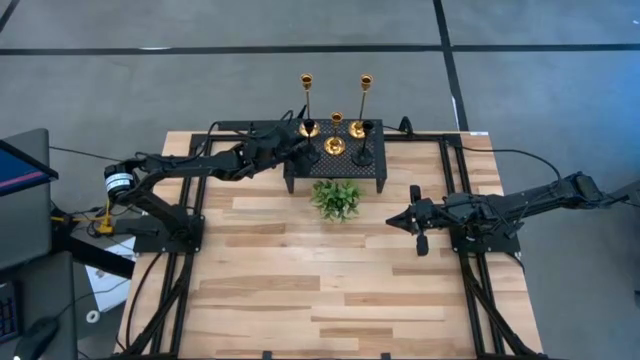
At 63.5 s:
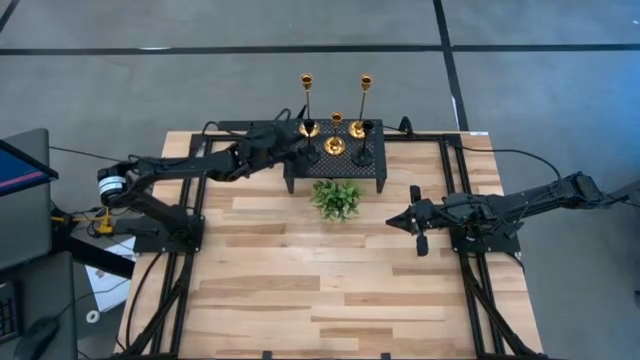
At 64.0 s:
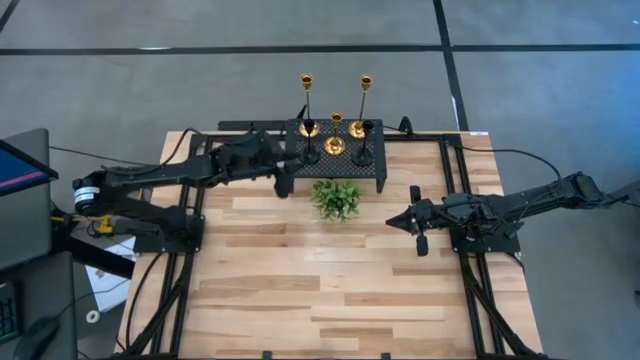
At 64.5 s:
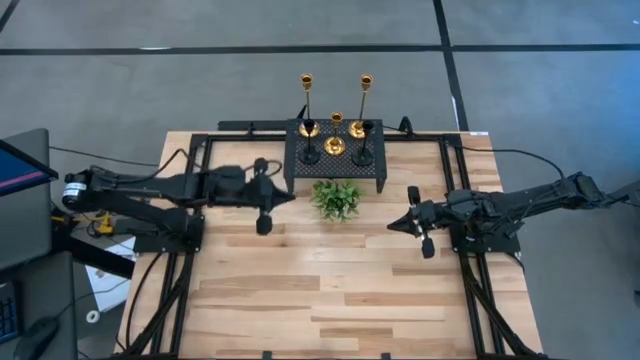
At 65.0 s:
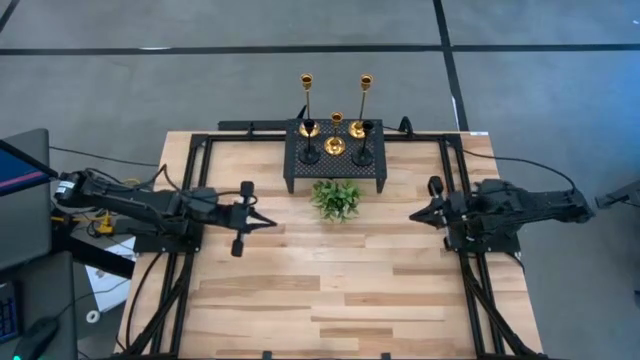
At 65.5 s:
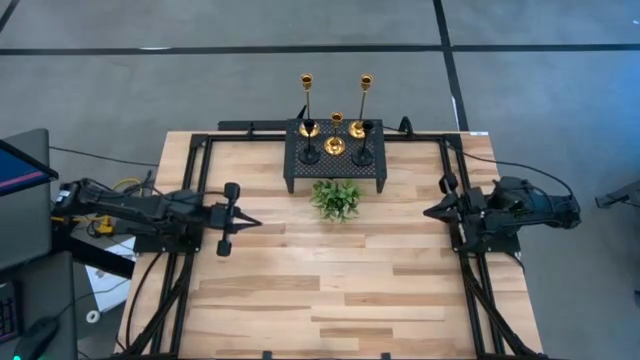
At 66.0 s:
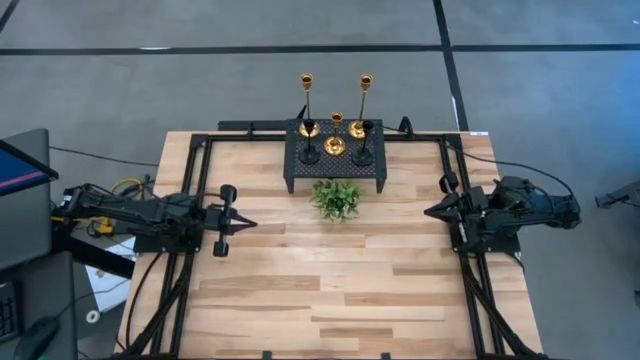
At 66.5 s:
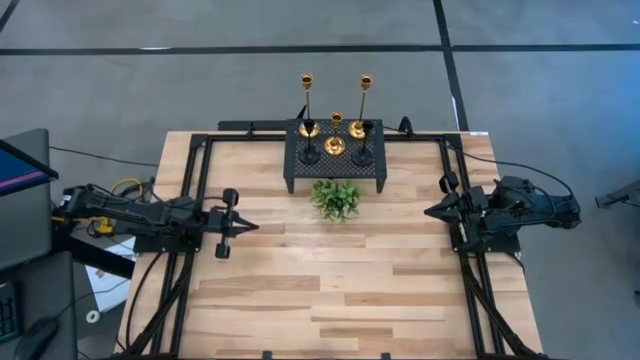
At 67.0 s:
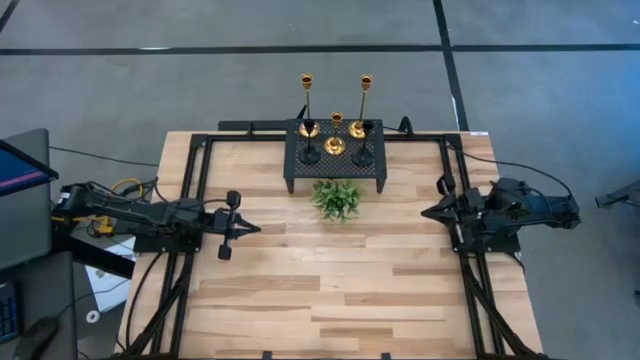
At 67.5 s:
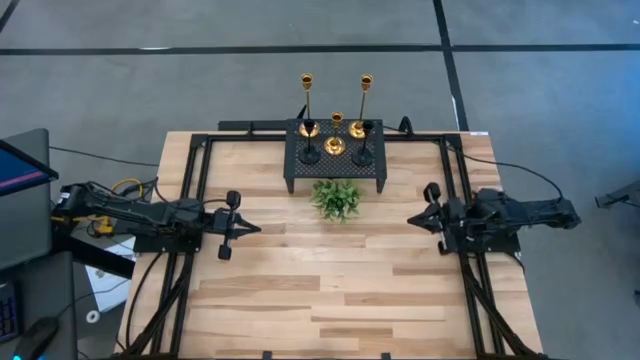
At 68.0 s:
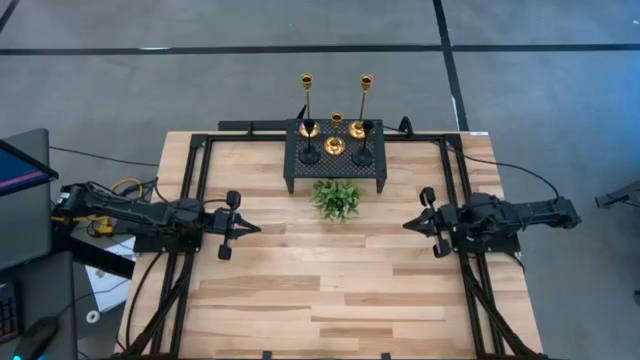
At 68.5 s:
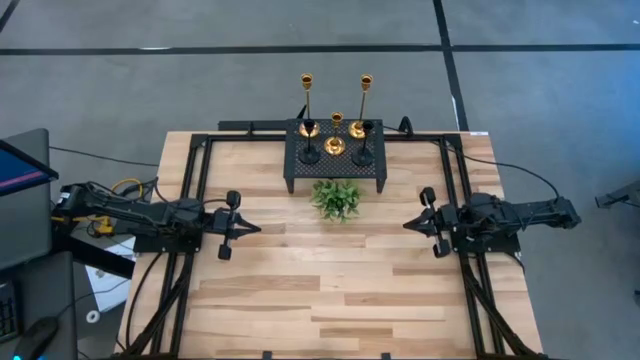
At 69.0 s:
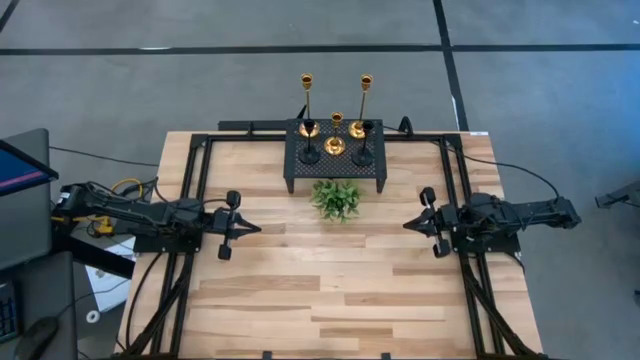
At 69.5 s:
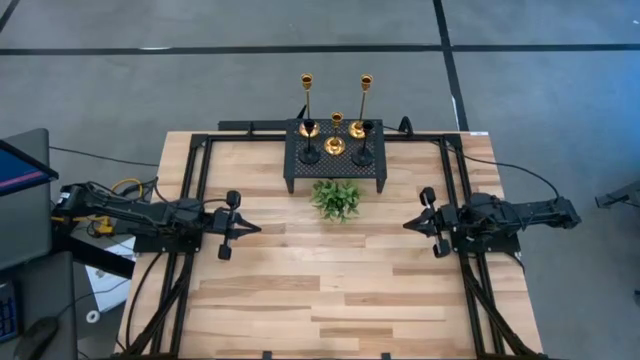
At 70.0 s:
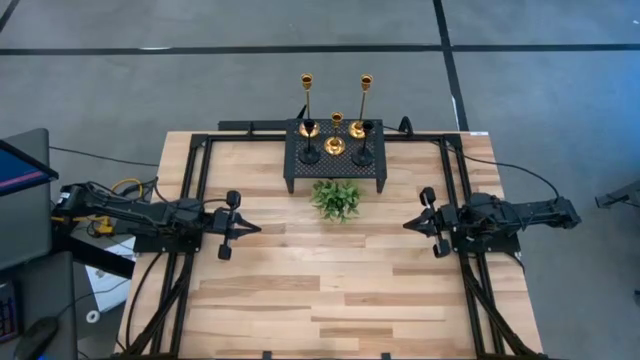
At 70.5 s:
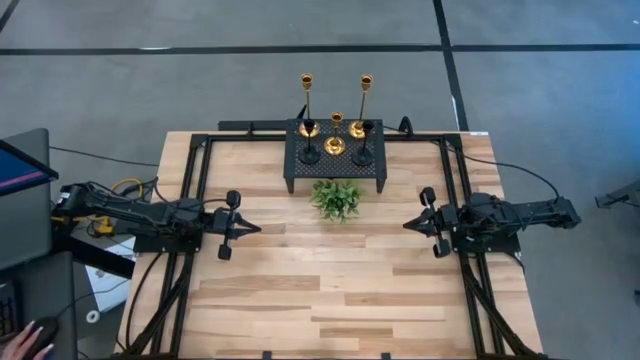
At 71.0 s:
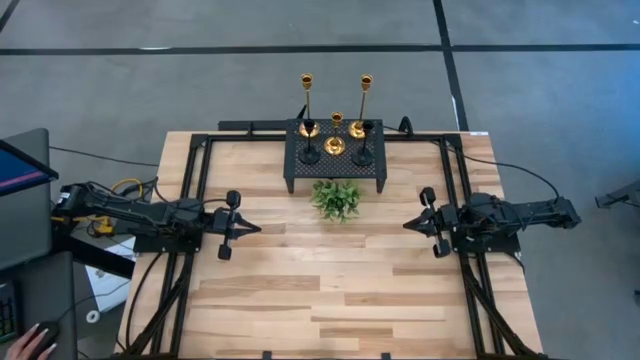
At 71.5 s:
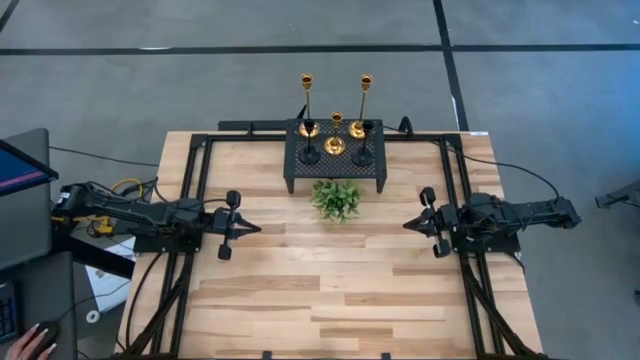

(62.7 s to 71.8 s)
Task: Pick & Place candle stick holders
Return to Home Position

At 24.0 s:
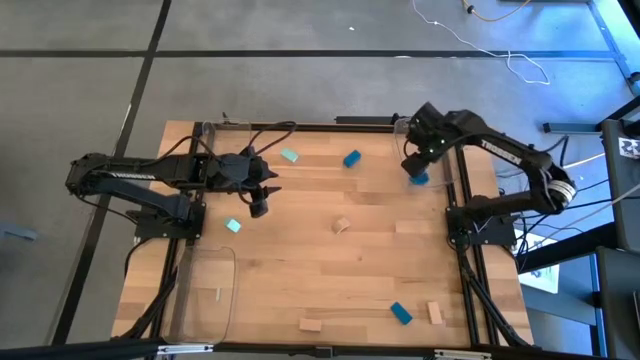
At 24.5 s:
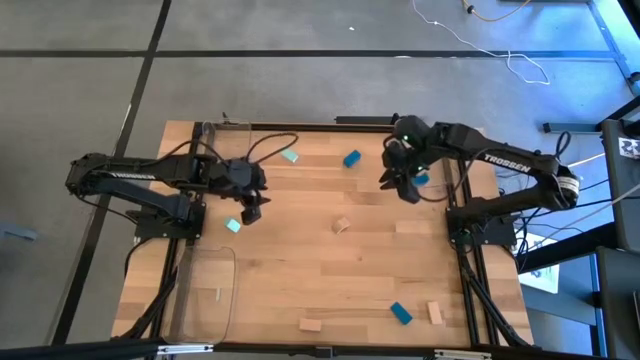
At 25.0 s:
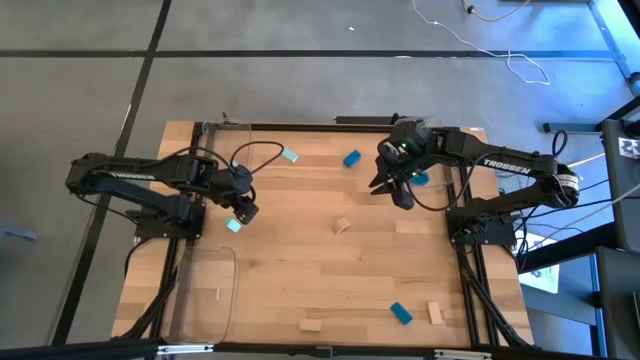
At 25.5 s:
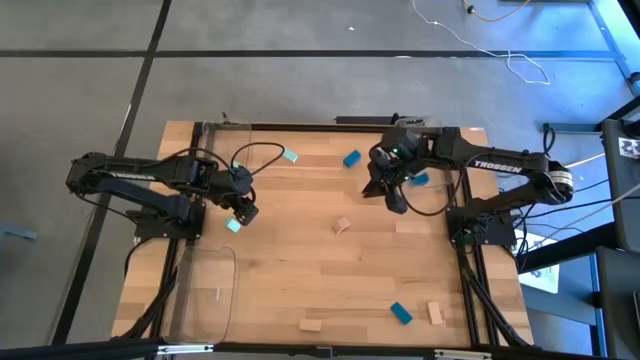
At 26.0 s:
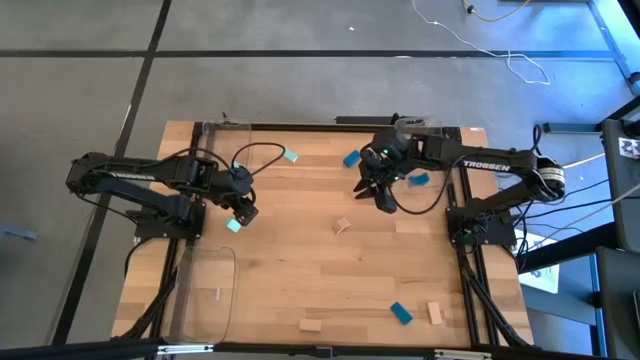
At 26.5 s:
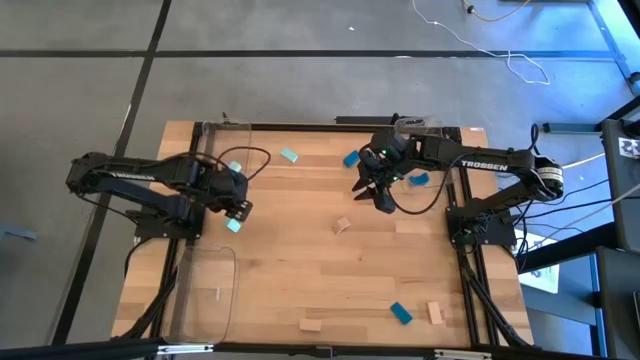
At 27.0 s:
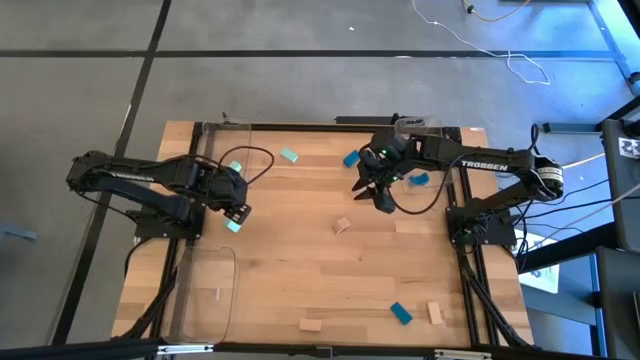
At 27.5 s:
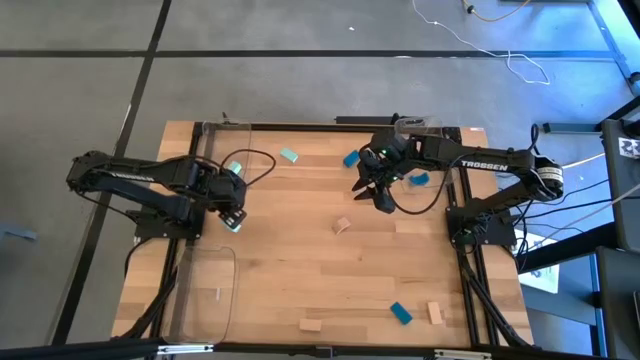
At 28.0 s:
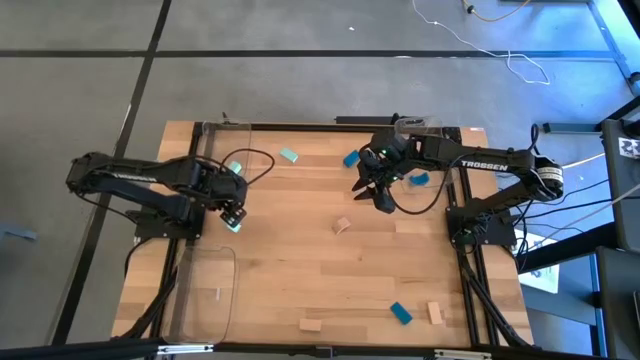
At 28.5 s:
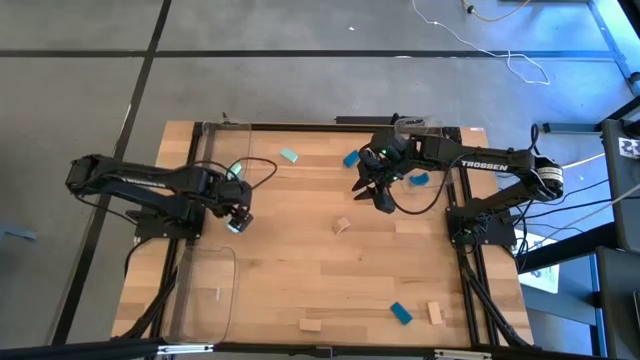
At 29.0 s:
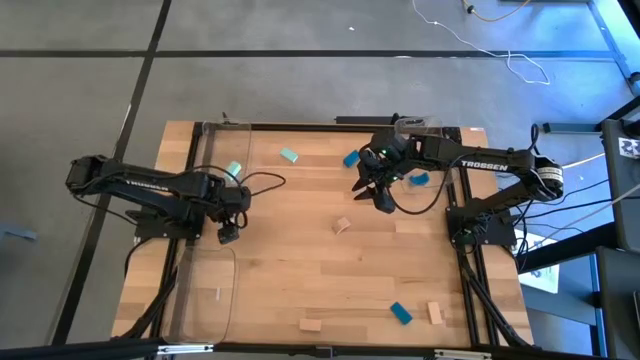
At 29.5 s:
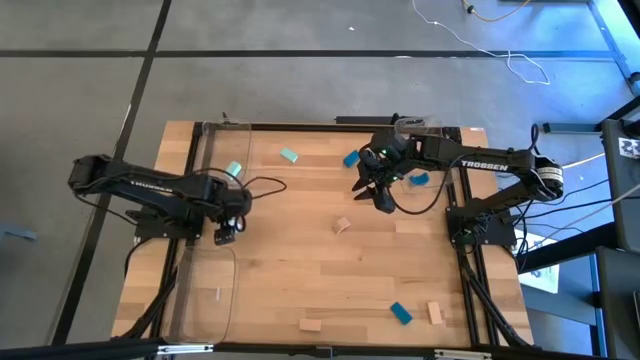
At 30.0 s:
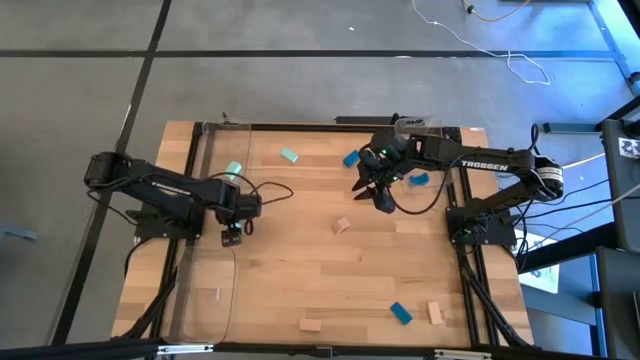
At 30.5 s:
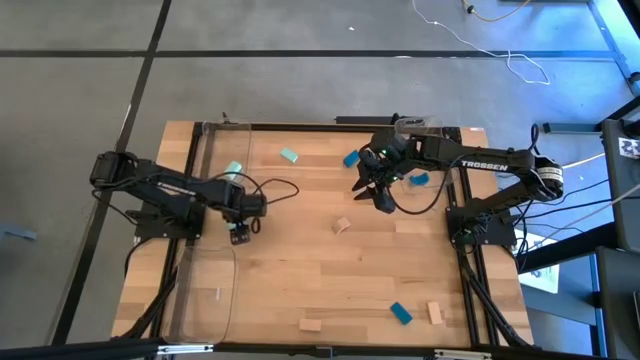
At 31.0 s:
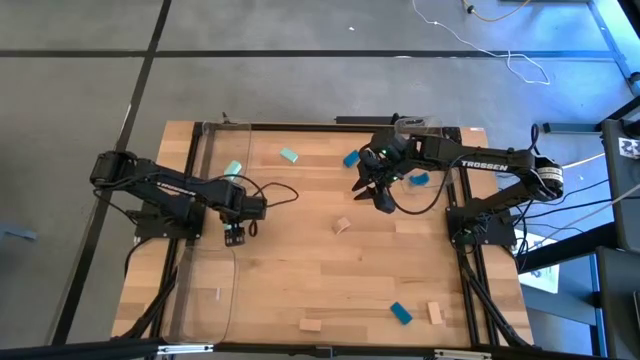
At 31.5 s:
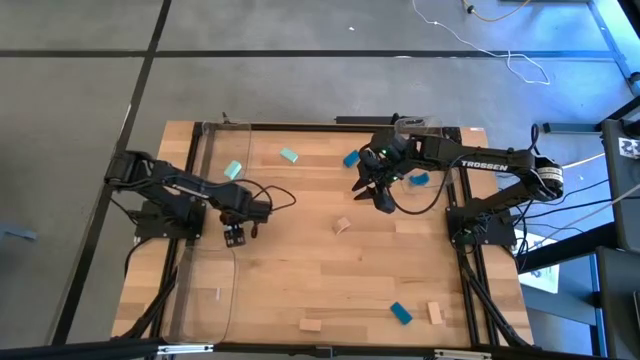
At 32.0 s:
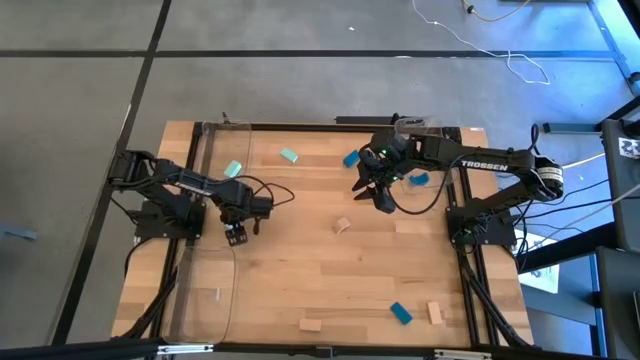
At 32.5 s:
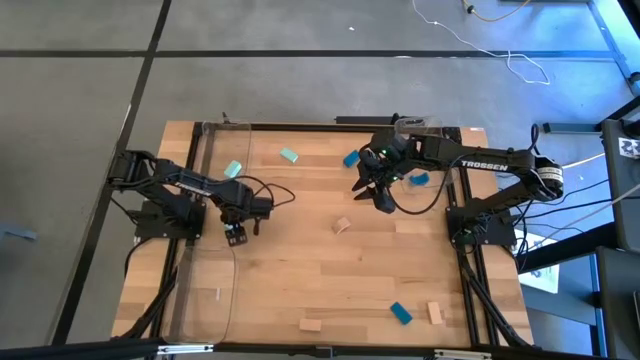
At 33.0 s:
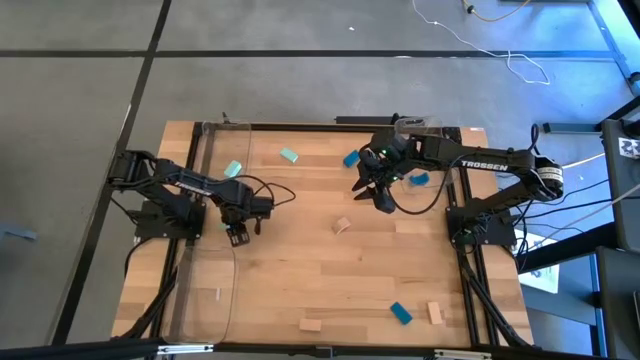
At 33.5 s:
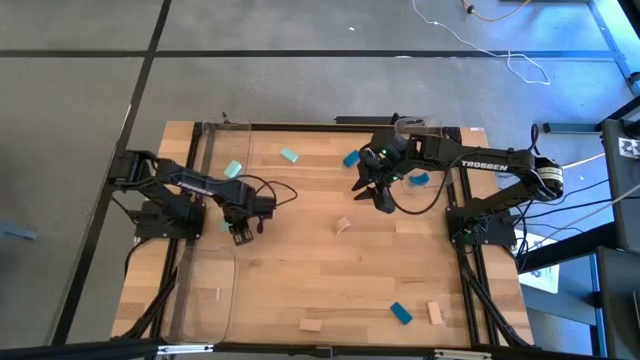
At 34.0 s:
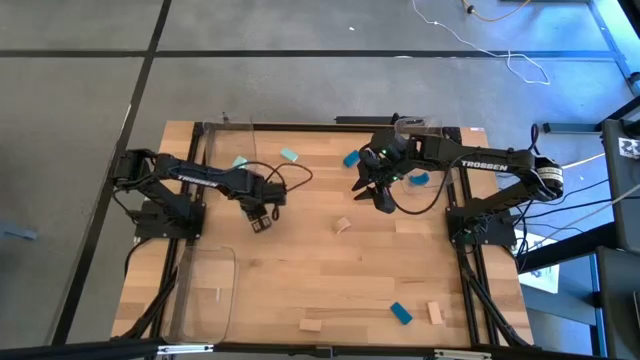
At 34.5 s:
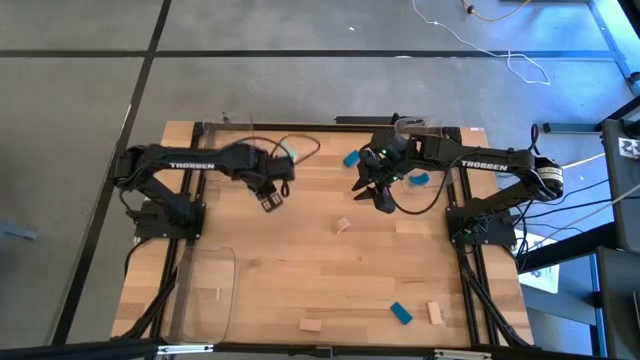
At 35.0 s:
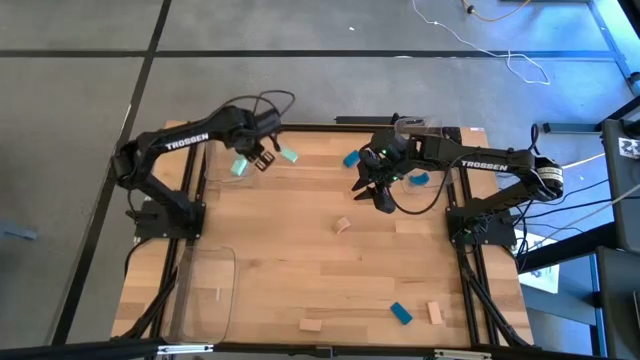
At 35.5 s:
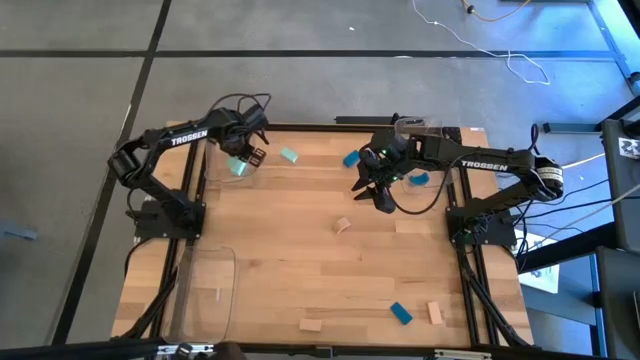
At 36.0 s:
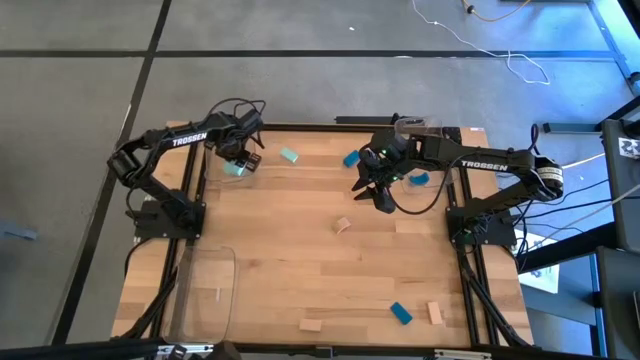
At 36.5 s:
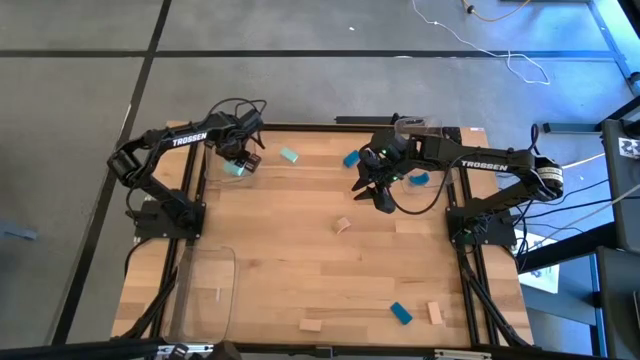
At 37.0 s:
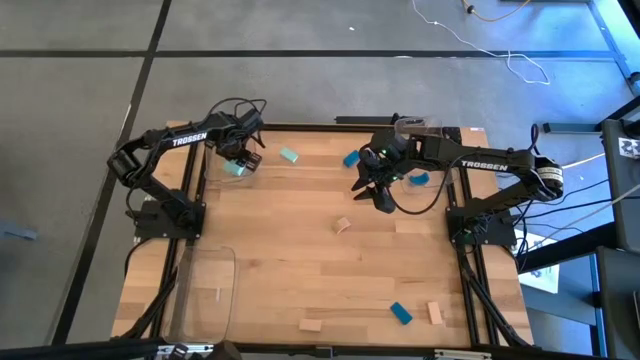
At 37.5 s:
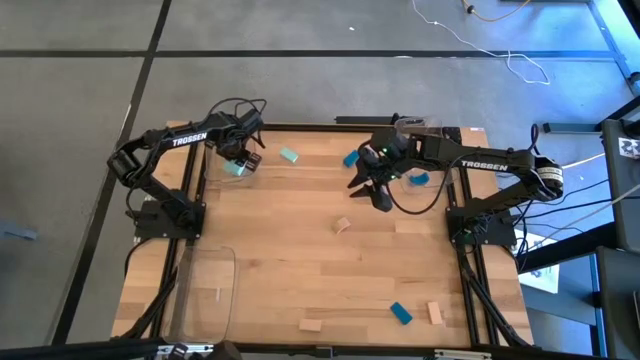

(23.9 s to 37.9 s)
Task: Sort & place blocks by color
Put the bottom light blue block into the top left transparent bin
